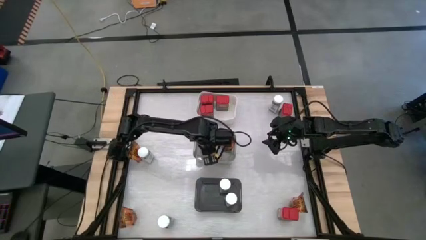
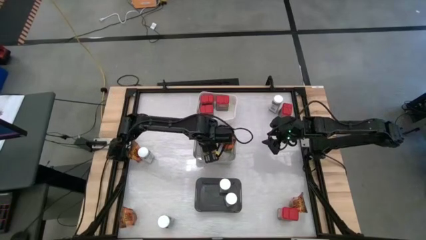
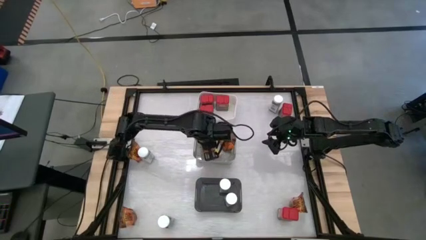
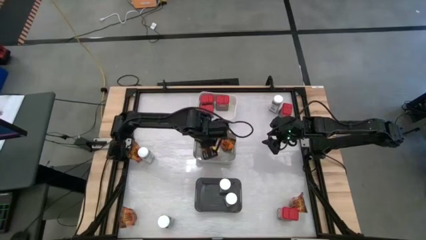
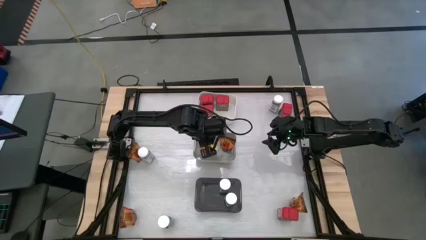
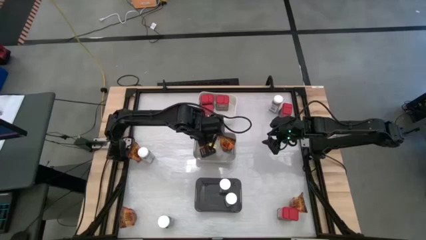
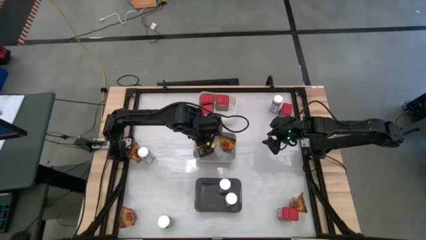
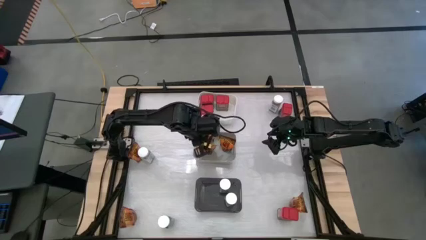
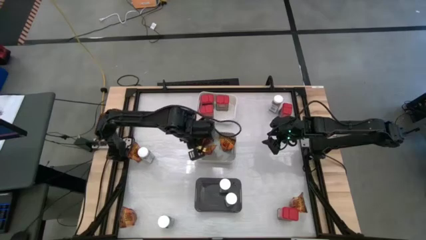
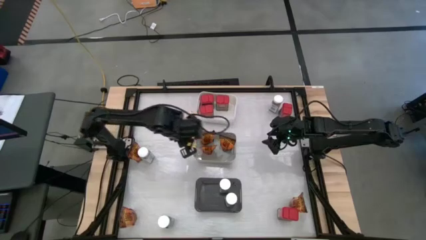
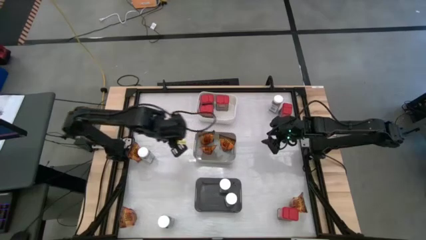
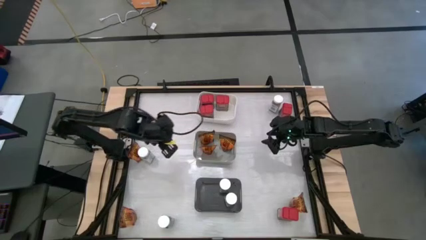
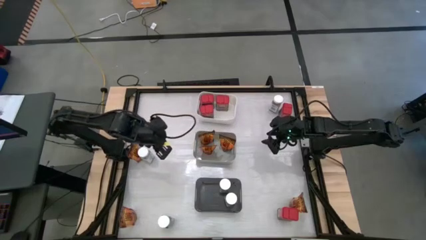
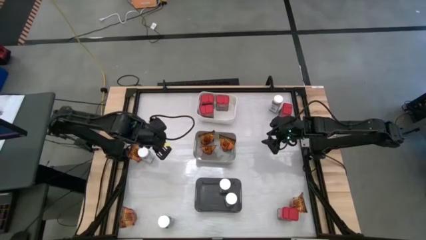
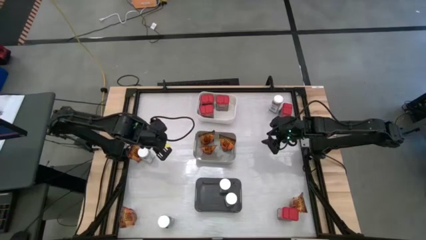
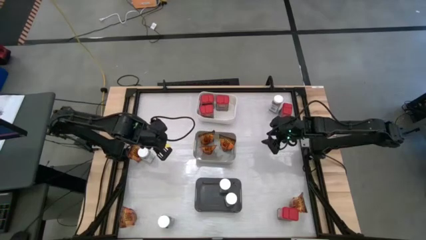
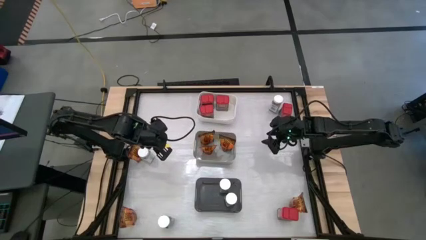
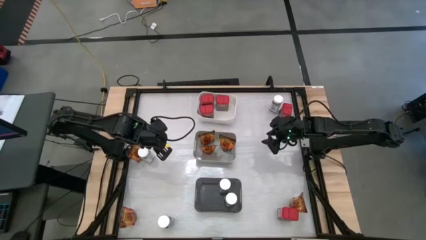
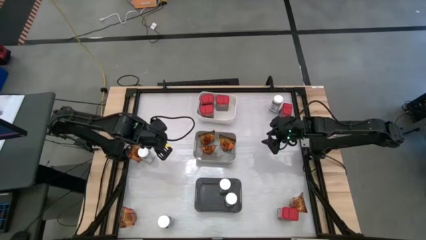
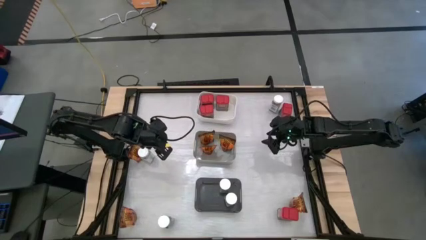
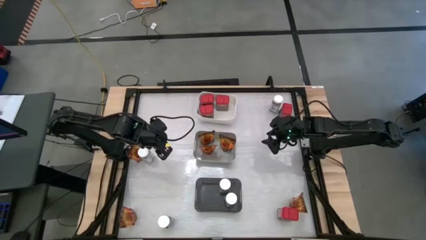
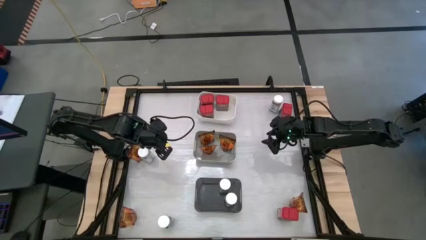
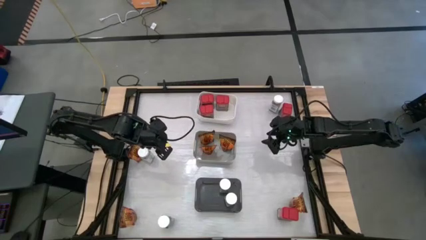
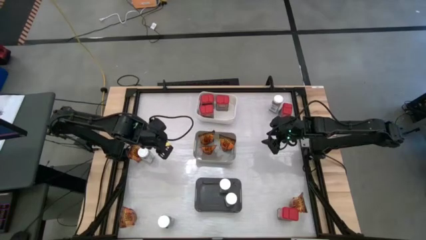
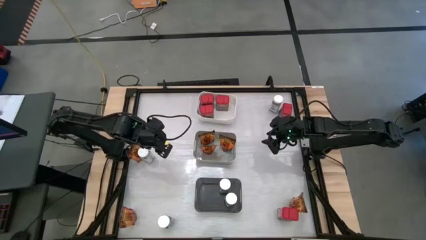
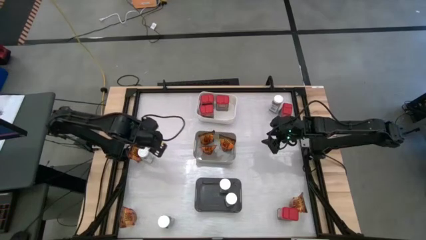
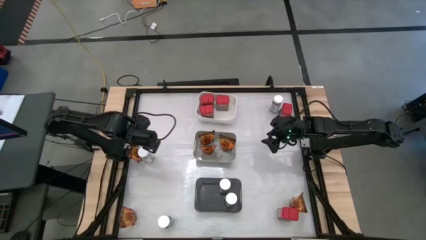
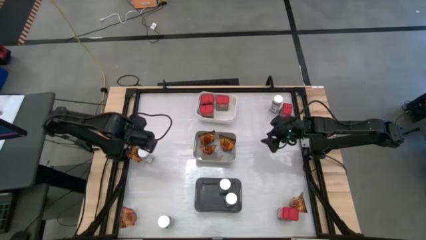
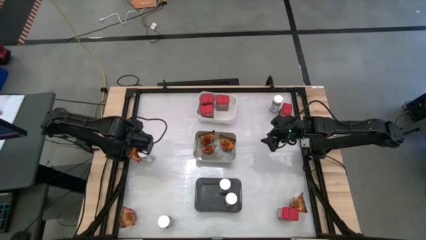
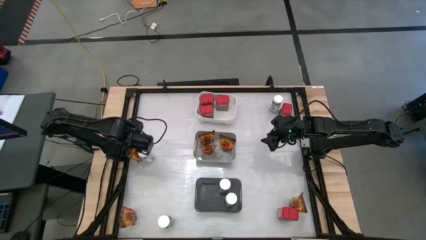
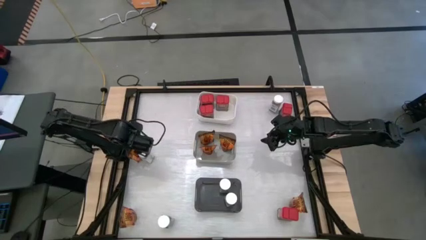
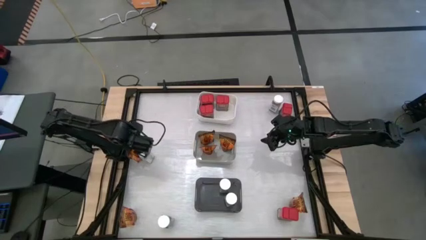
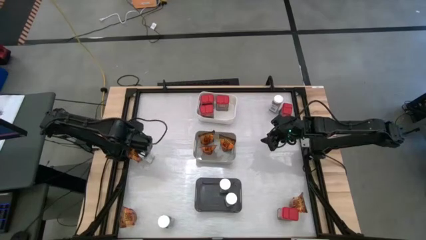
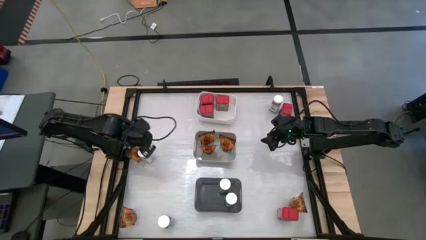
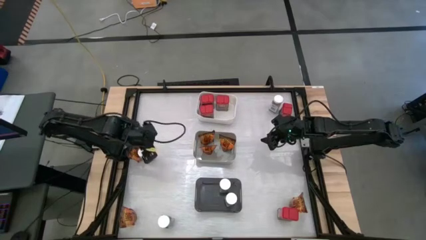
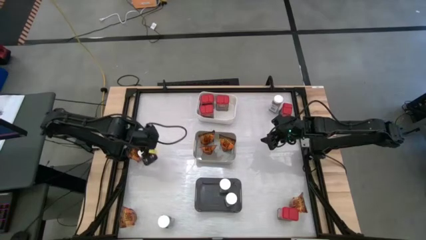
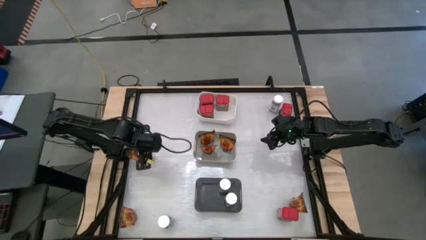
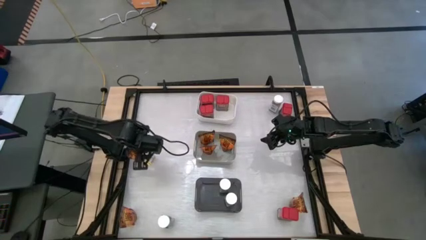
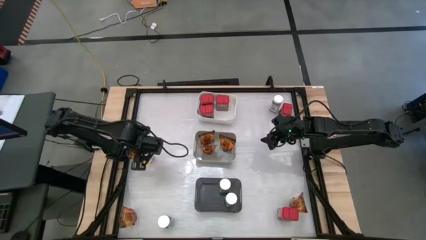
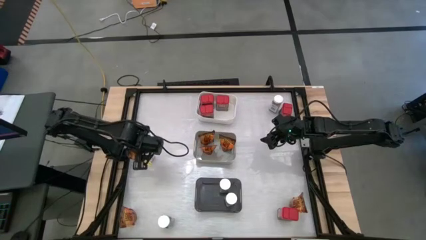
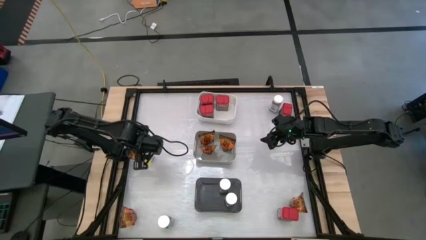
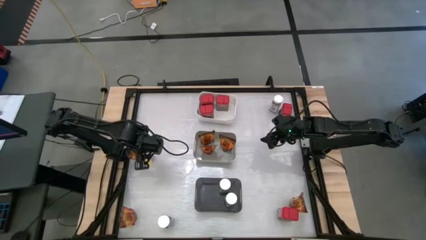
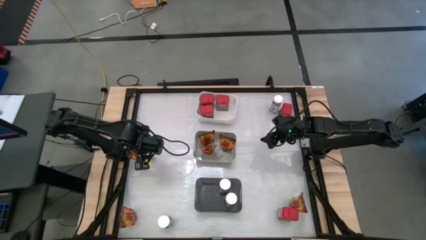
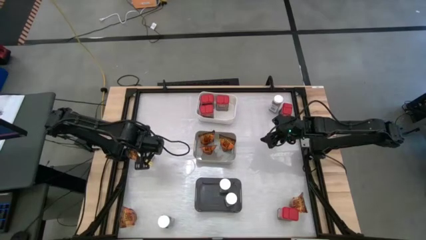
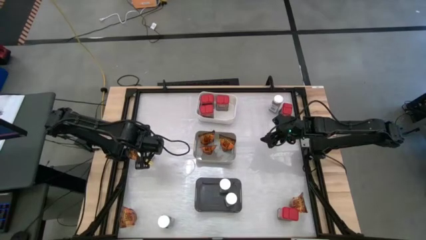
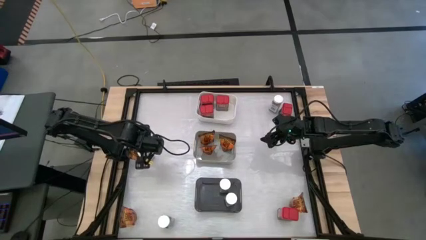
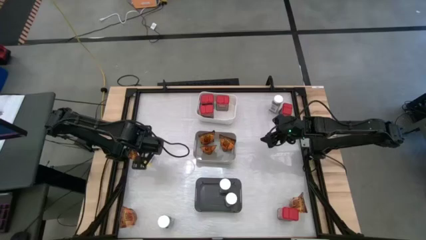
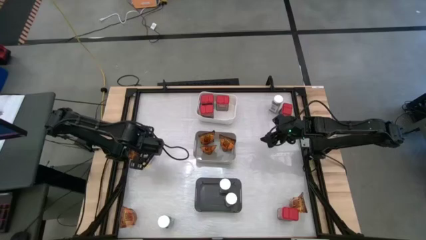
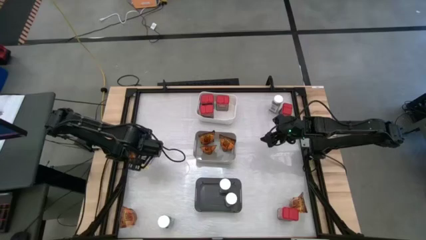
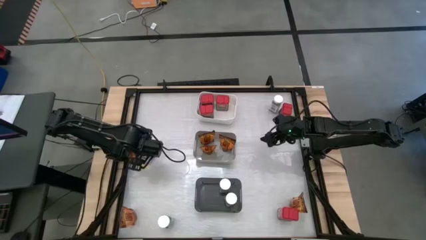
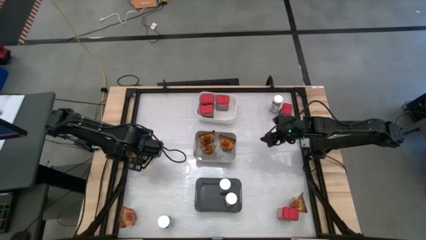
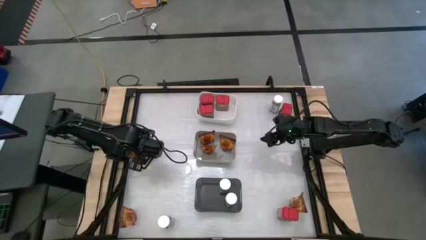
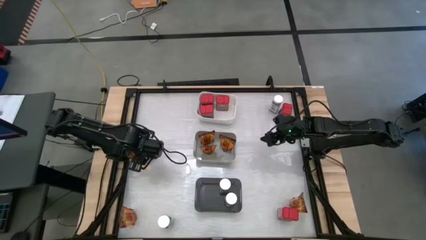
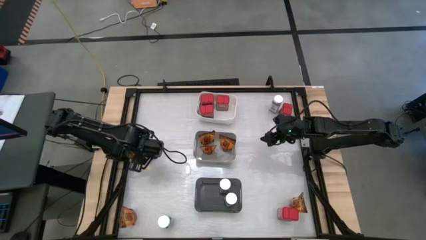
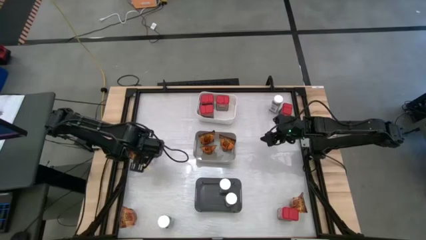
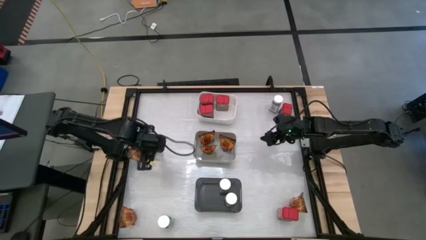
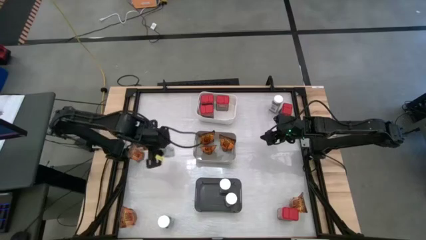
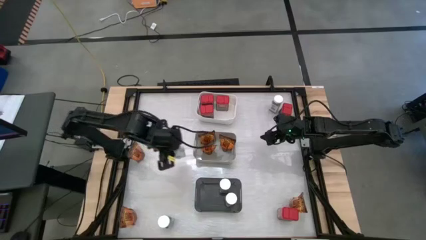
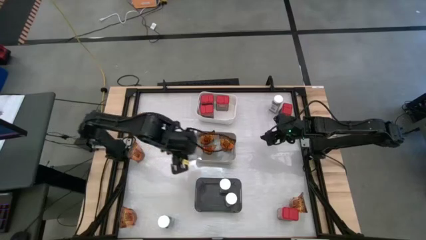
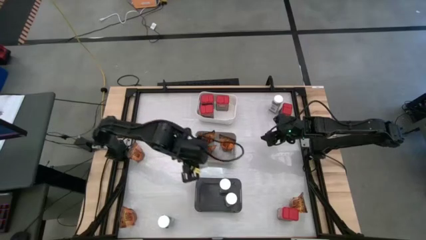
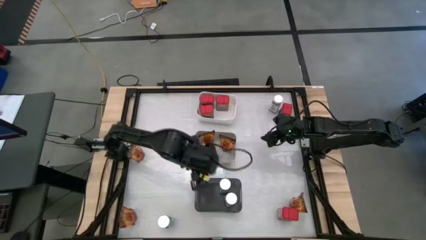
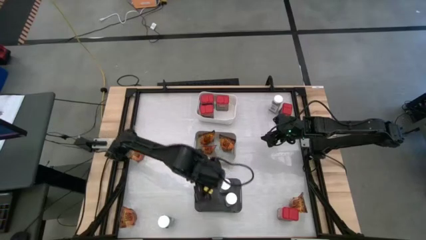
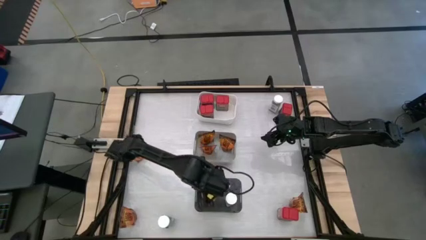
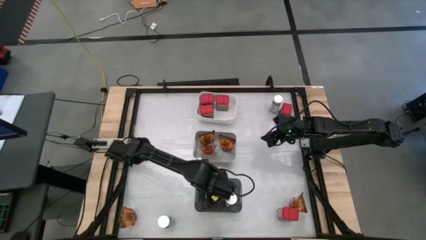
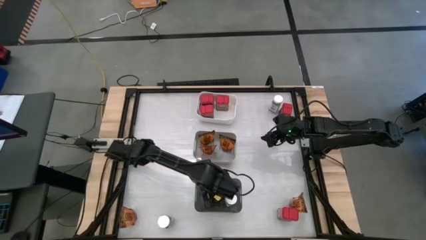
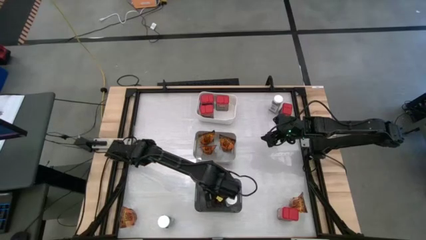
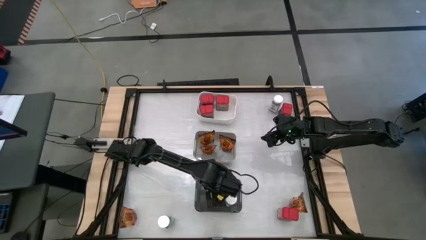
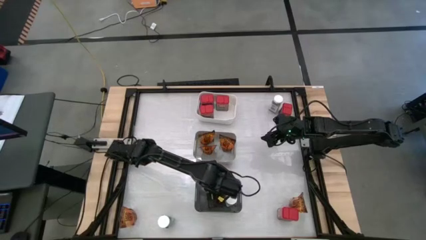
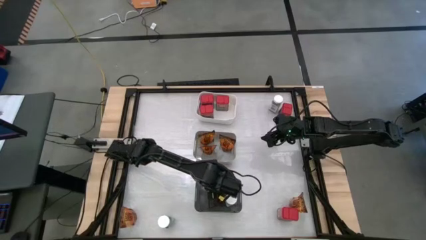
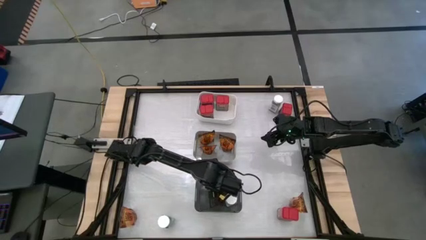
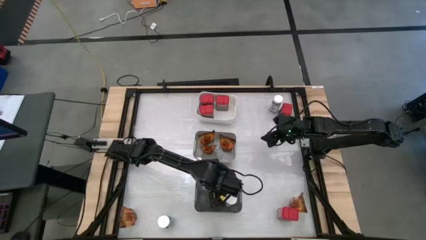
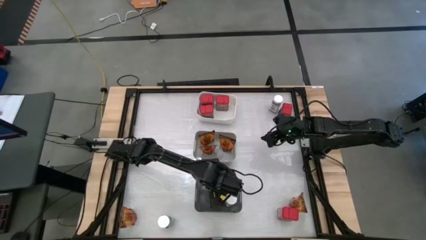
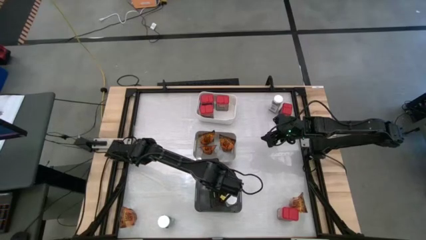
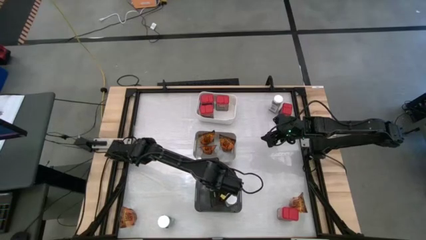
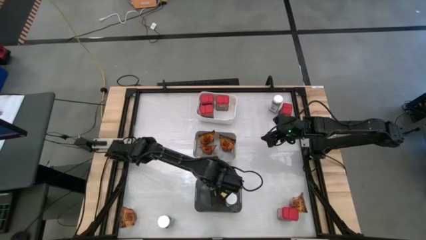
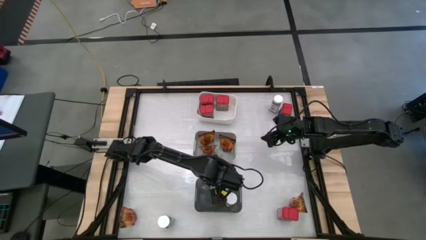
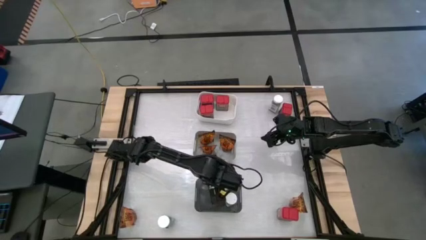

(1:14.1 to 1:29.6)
Task: Sort spices by type
Put the white seasoning bottle into the black bin
